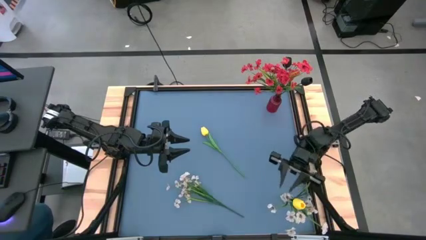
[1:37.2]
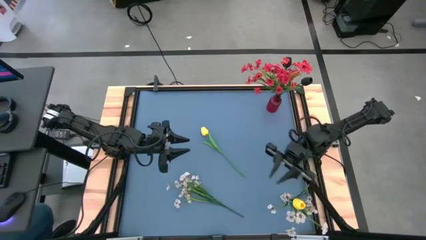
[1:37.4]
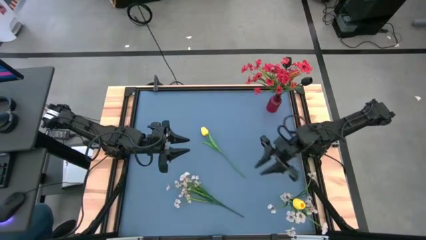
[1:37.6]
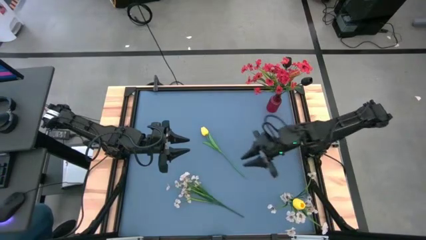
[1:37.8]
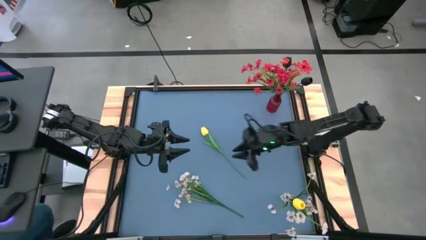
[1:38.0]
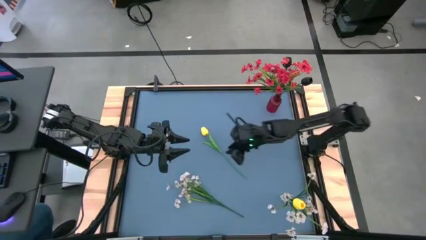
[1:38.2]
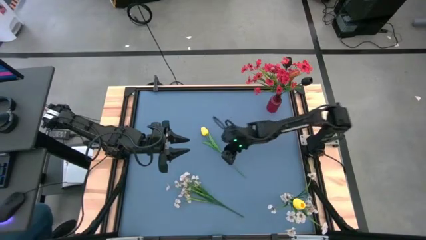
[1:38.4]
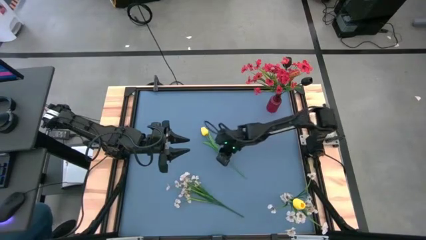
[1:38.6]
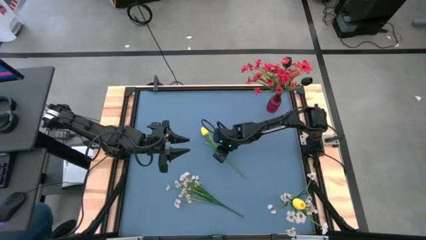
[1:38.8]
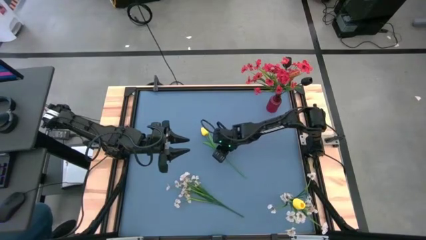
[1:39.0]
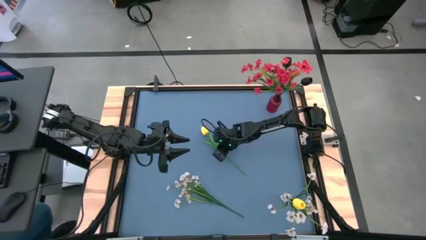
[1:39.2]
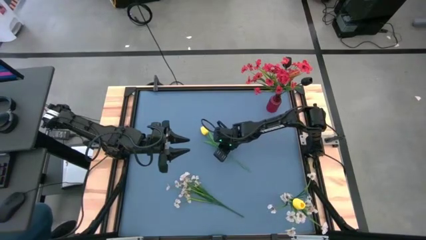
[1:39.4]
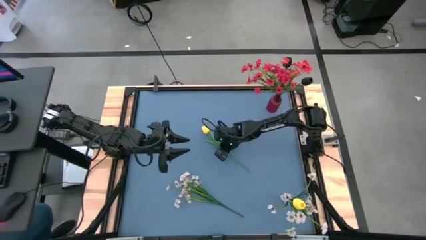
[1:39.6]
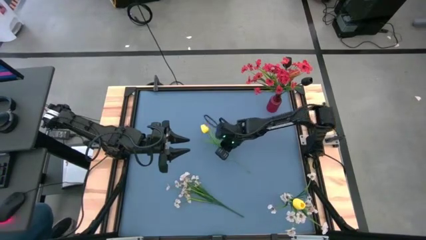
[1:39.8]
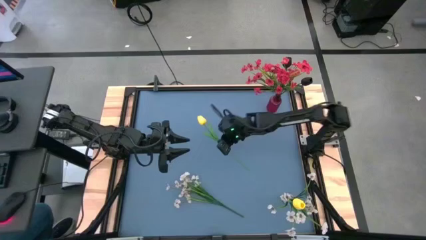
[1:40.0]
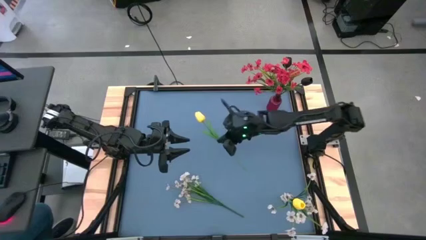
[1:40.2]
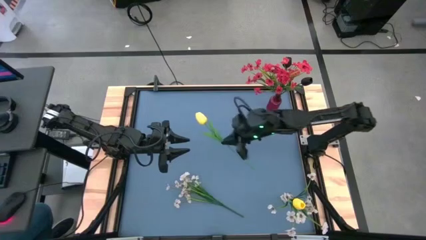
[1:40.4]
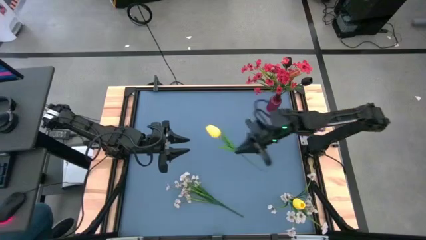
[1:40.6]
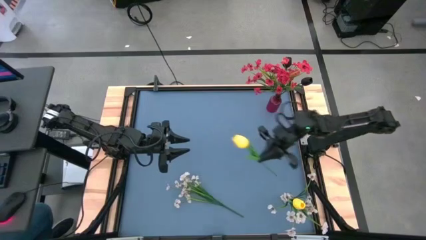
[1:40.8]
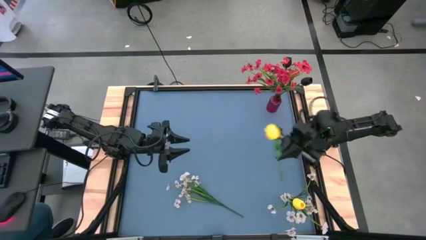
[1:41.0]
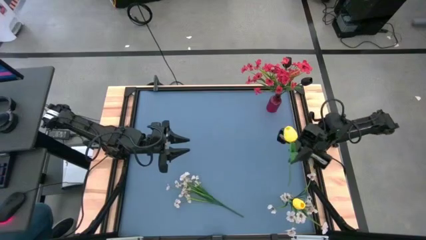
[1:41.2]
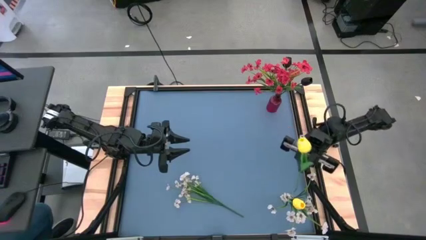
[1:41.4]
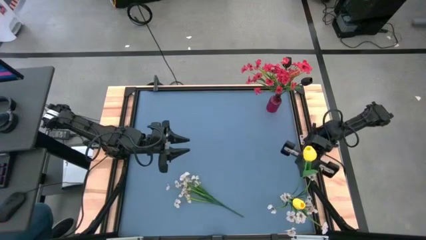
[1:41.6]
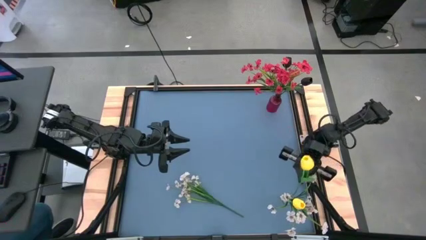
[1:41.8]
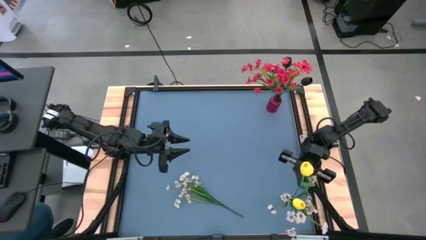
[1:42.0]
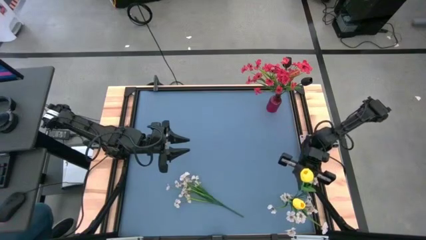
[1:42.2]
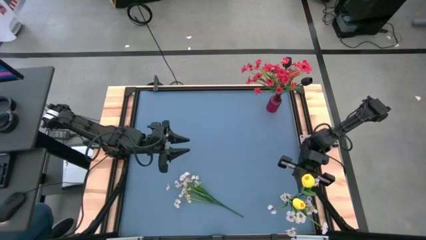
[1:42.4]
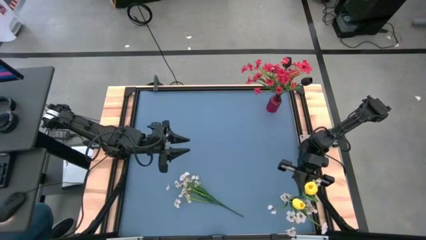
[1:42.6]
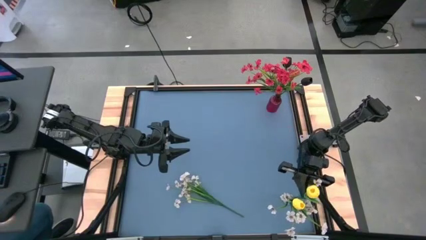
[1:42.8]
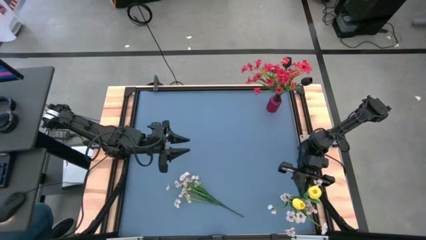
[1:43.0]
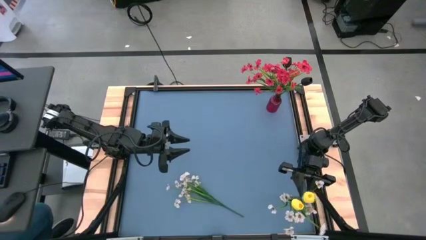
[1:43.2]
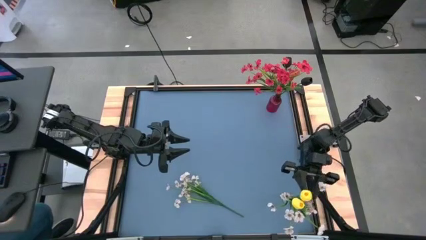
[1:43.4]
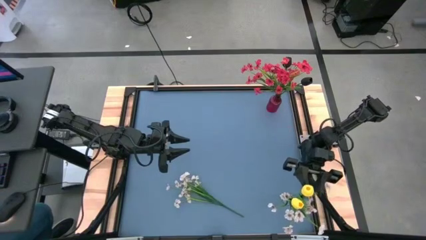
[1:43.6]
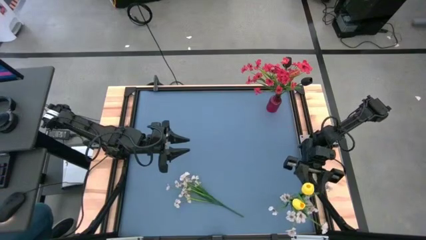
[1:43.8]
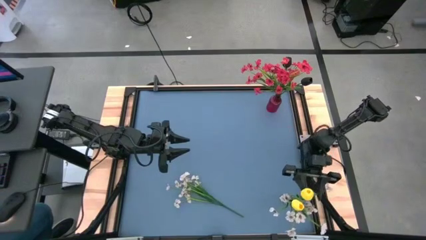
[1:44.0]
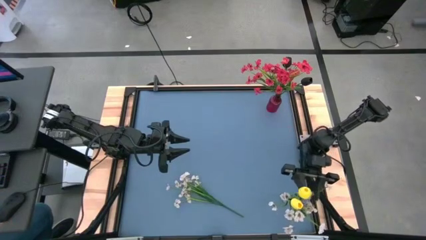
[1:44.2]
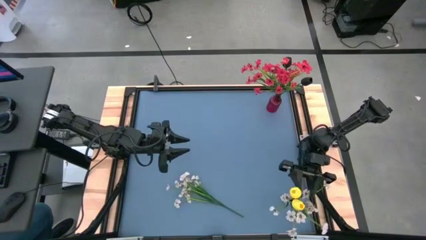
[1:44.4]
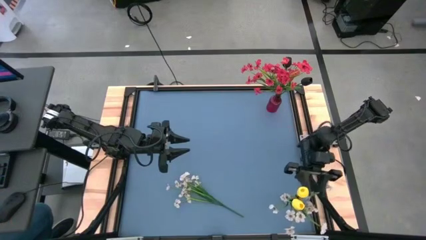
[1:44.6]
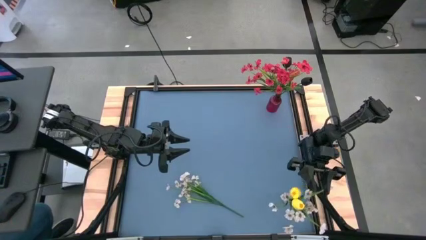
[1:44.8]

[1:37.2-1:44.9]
Task: Sort flowers into vase by color
Put the yellow tulip into the transparent vase

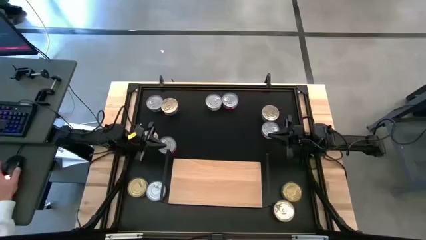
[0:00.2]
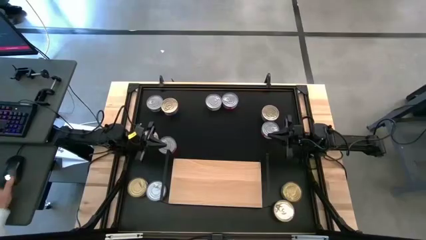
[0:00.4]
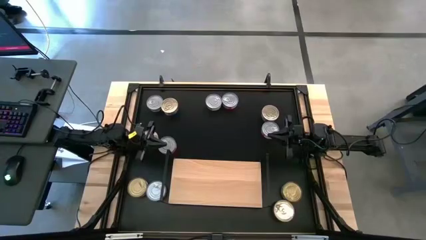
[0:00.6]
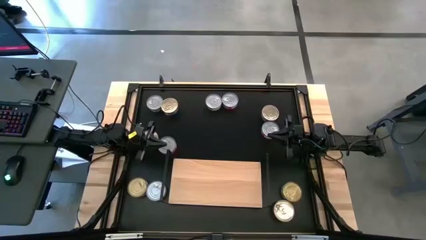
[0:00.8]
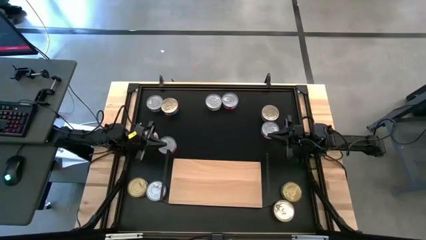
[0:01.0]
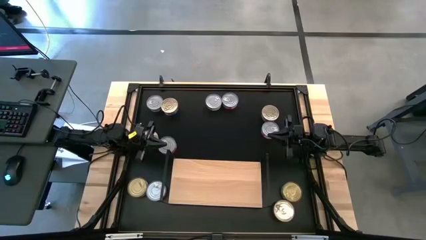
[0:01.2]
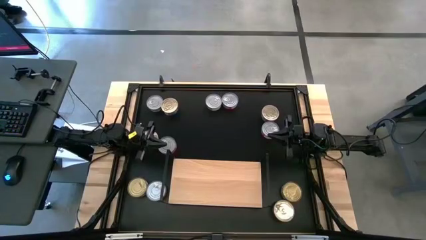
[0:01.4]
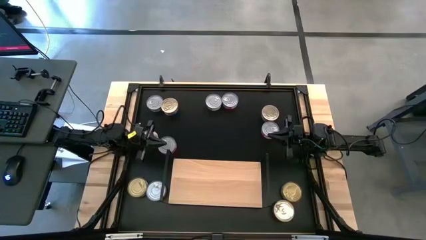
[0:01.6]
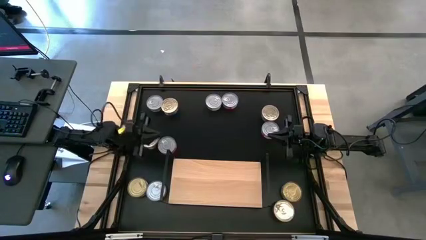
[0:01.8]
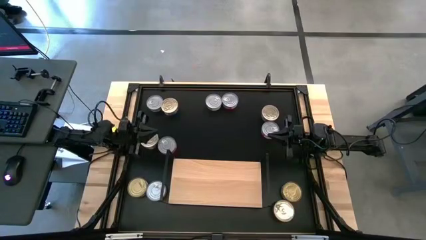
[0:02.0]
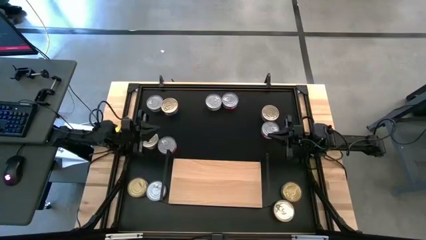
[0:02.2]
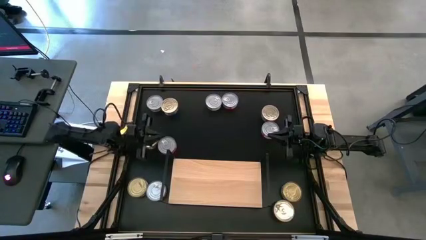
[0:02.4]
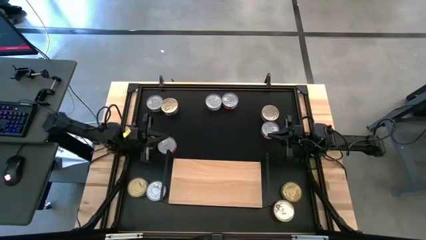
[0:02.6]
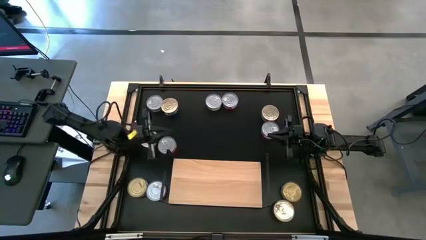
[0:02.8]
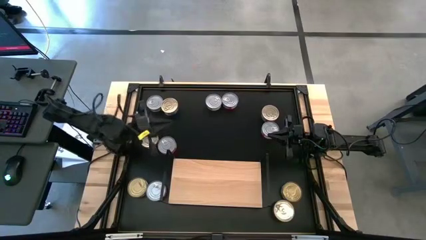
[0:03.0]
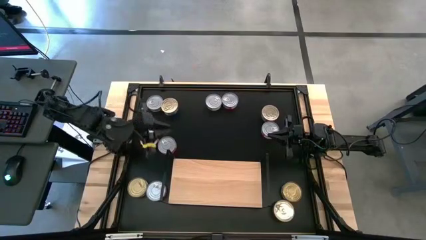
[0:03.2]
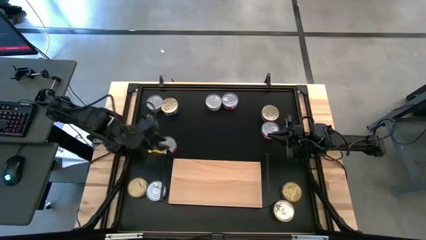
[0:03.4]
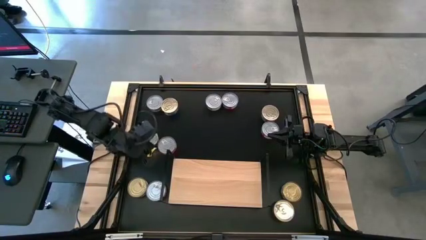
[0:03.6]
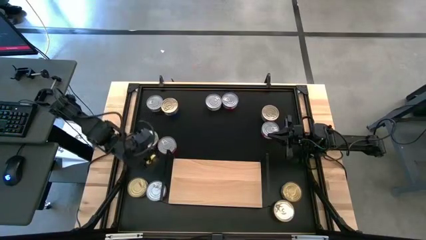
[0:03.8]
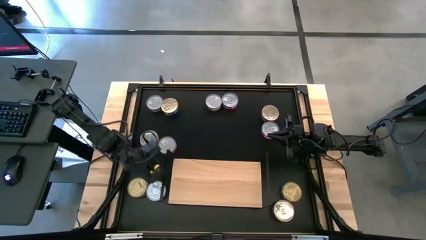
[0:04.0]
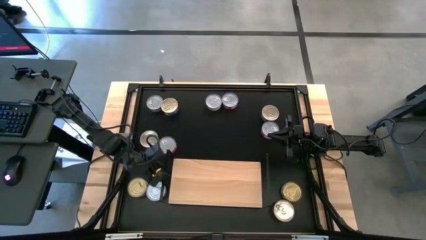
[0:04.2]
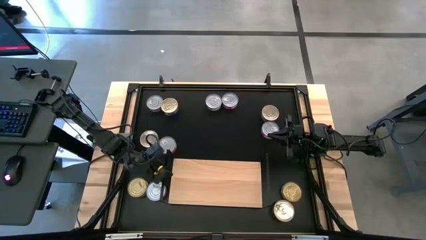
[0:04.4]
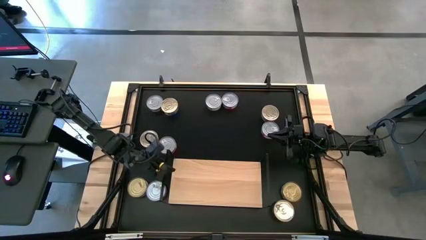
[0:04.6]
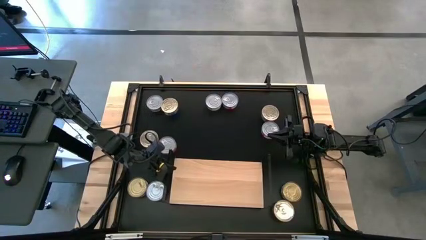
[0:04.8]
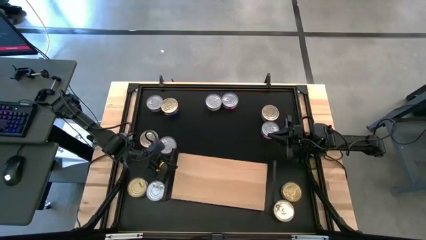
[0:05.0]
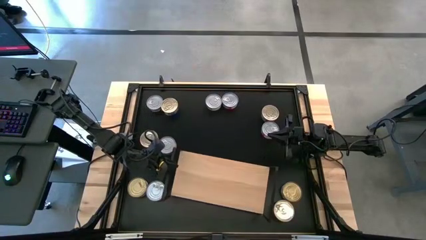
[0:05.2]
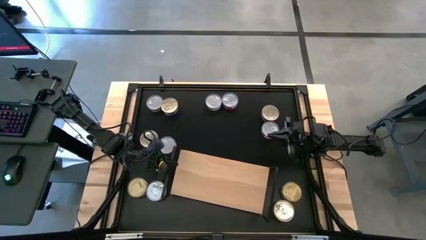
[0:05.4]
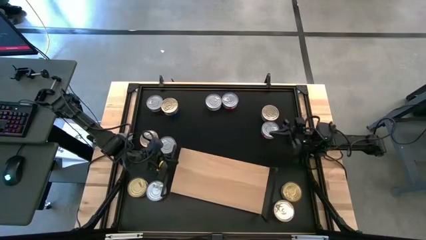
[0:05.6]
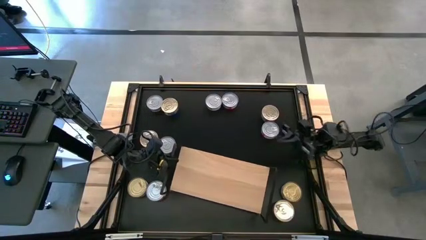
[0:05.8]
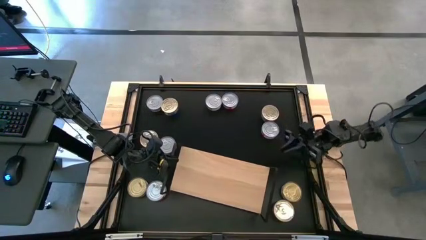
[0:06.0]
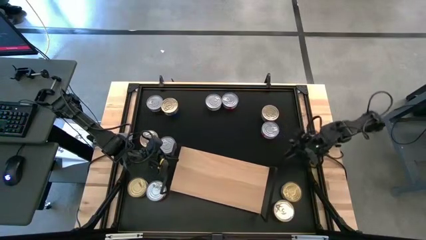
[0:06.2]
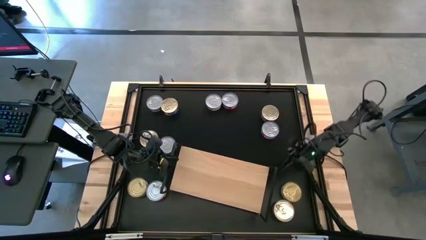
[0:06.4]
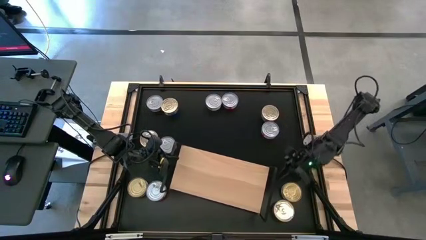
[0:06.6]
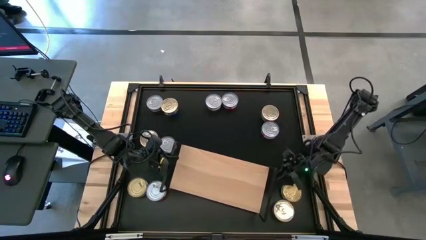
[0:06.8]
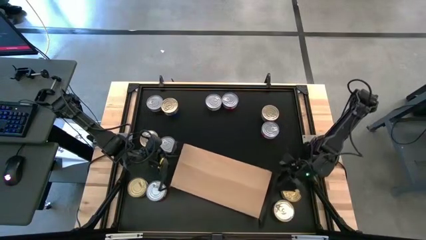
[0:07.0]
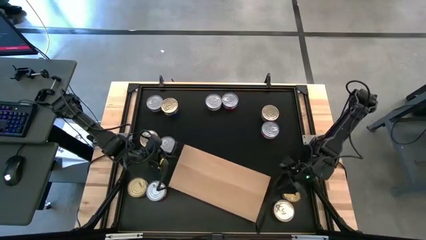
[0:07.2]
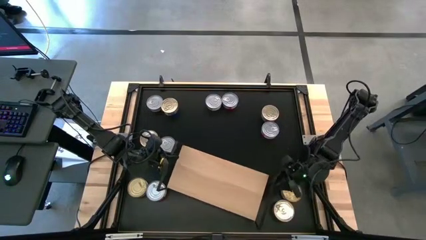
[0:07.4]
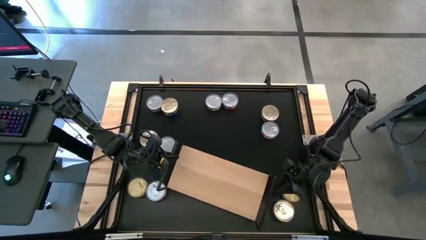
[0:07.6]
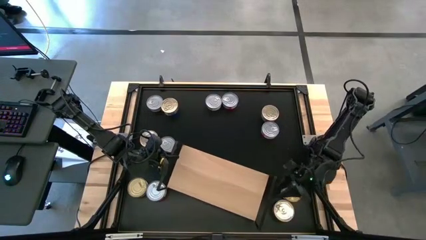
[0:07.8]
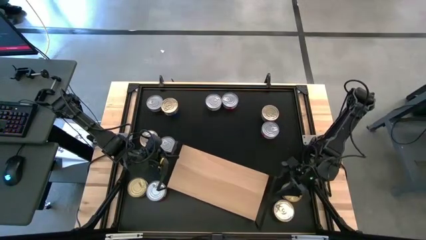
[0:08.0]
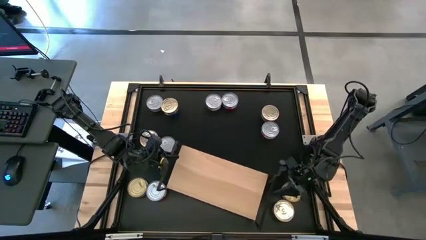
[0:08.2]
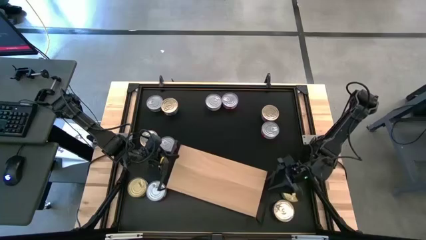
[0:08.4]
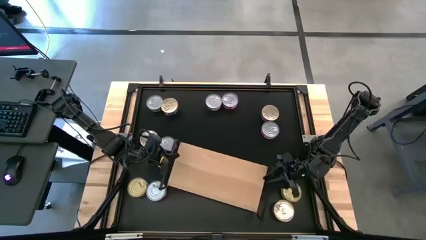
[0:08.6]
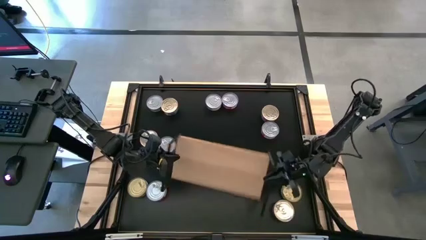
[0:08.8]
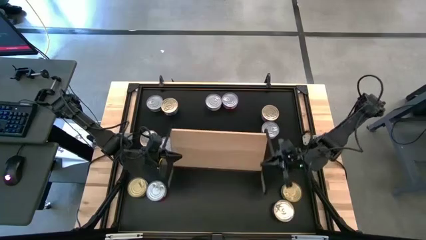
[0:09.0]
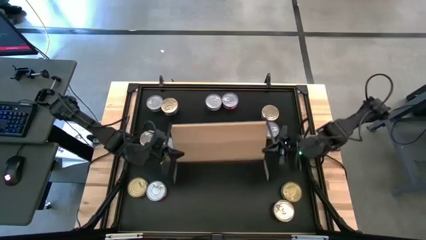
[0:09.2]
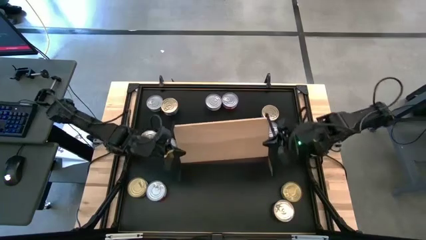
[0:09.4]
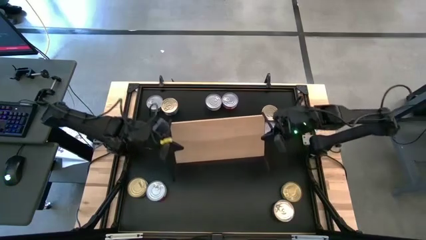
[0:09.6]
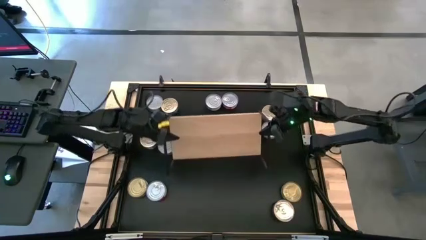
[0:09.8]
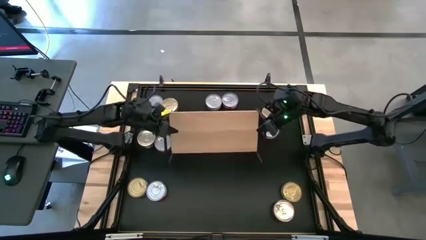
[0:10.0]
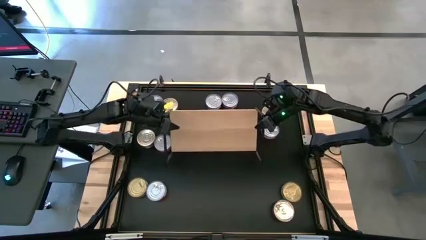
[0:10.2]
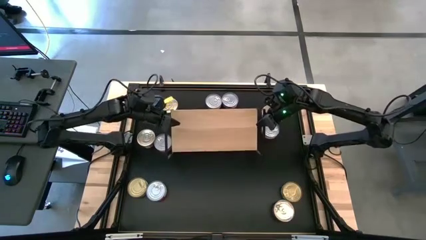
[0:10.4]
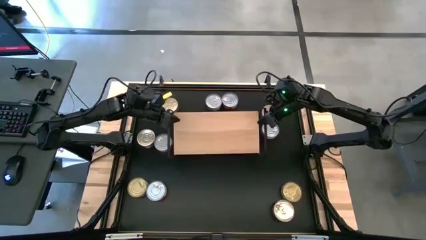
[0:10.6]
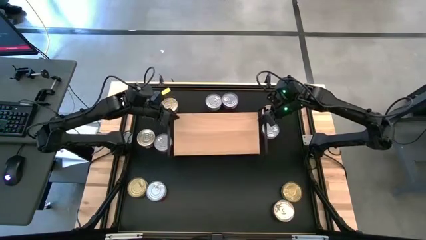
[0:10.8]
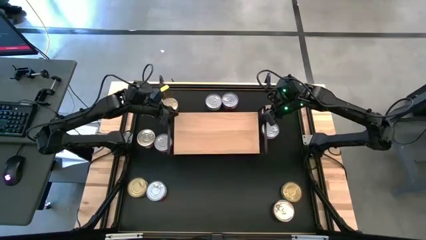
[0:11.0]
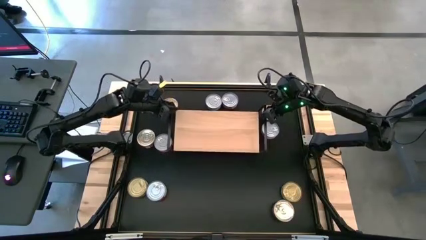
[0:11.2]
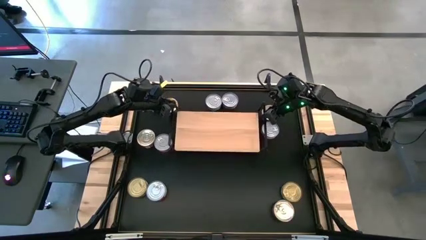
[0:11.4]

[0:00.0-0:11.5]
Task: Stack canned seafood by type on shelf
Move the shelf to the center
